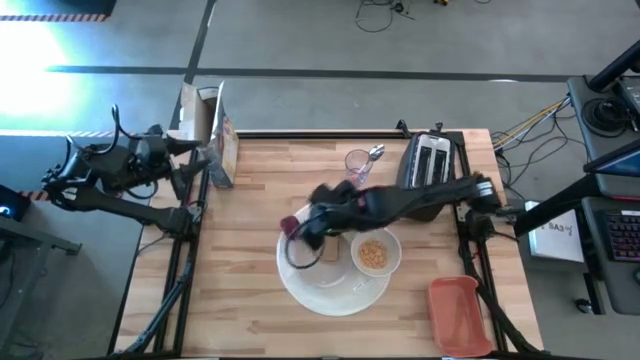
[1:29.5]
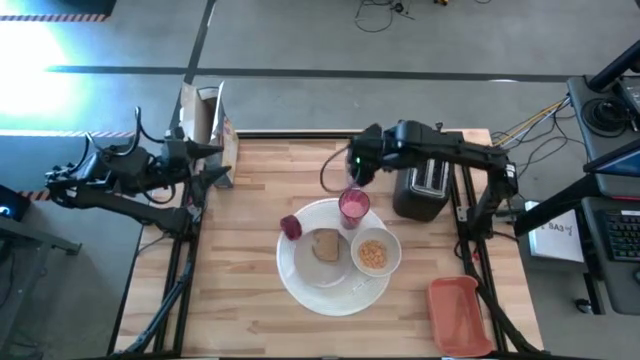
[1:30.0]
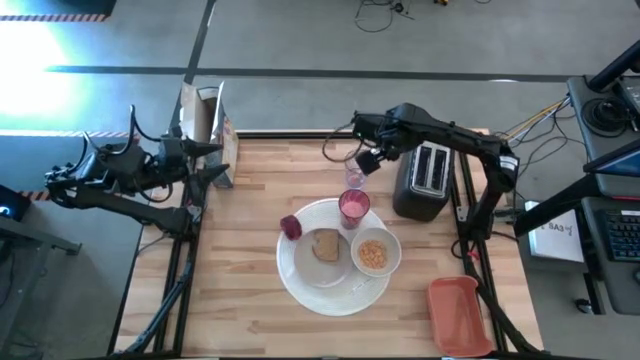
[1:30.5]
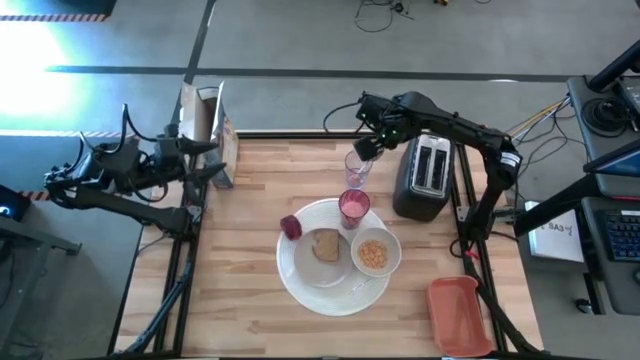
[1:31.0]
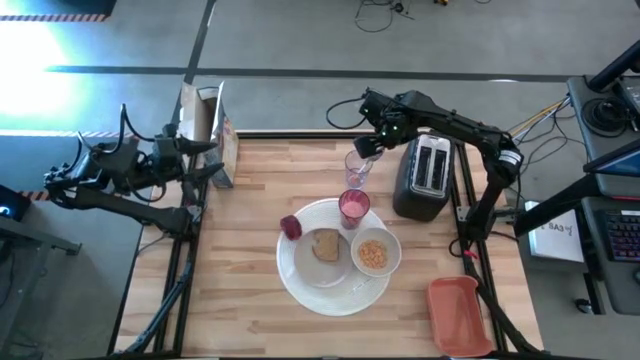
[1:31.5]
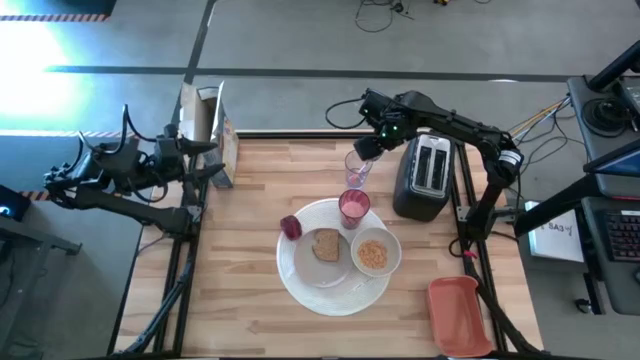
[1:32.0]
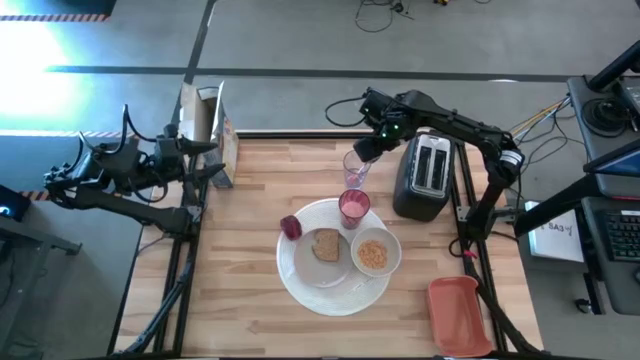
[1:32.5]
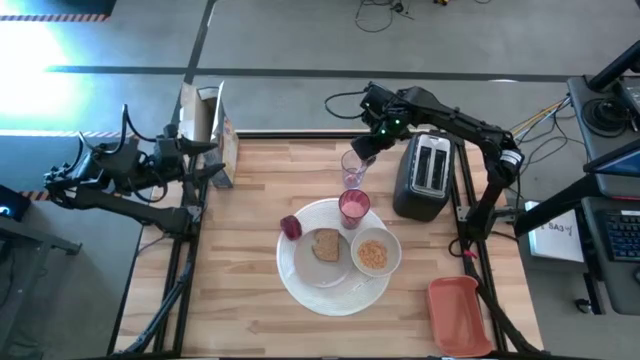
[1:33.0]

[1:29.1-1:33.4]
Task: Arrange a breakfast setting
Put the orange spoon from the transparent cup to the right of the white bowl

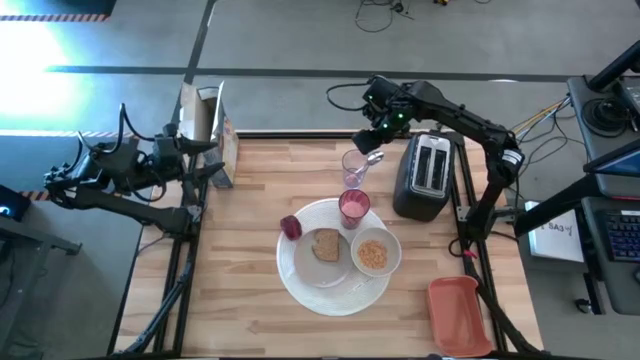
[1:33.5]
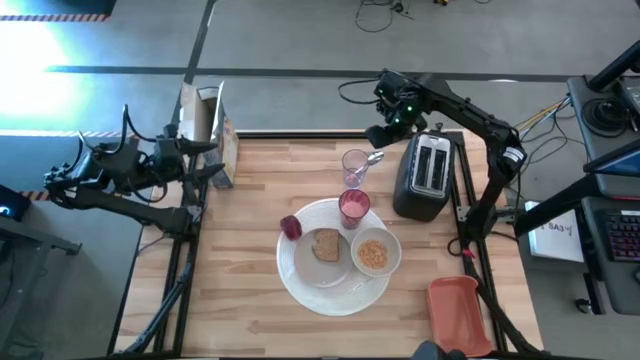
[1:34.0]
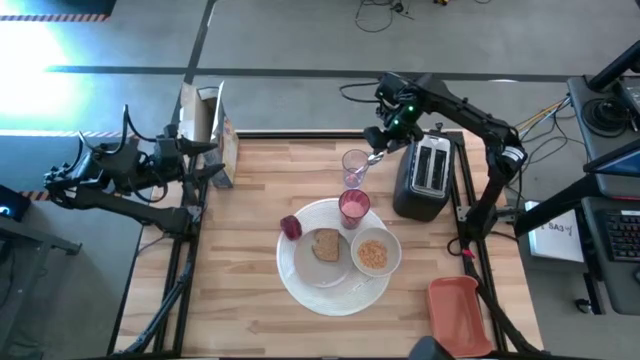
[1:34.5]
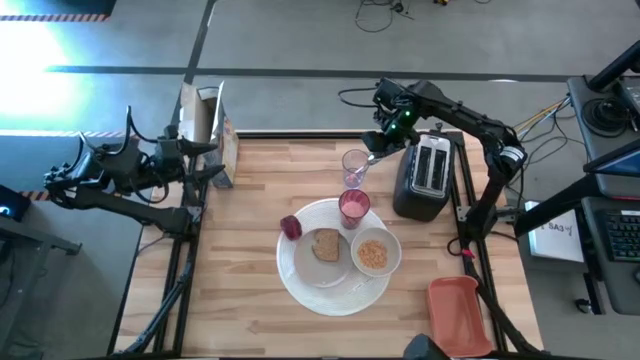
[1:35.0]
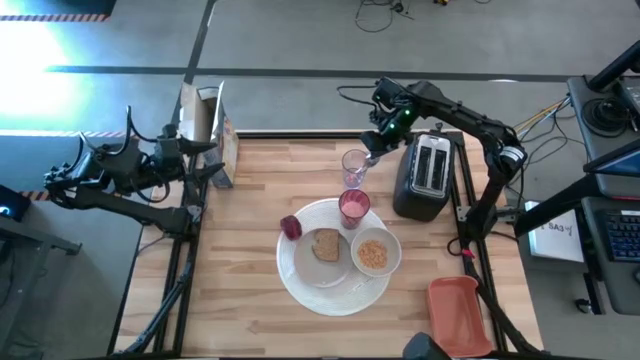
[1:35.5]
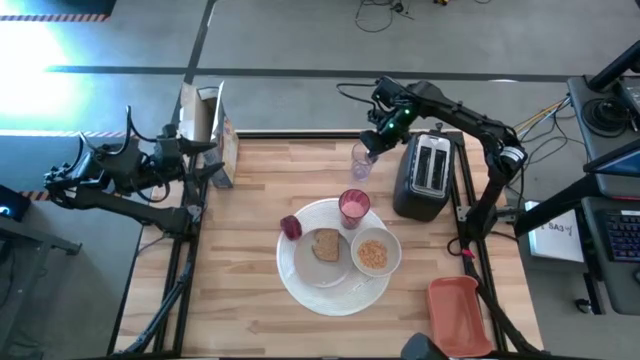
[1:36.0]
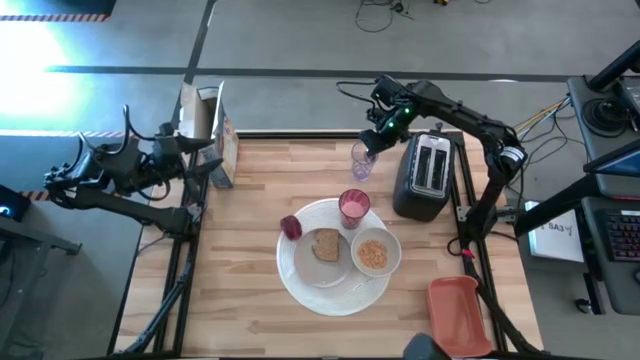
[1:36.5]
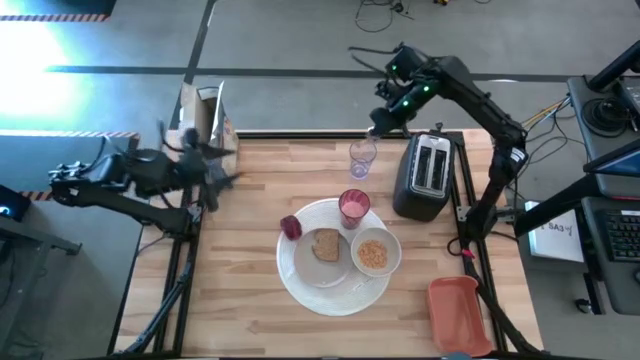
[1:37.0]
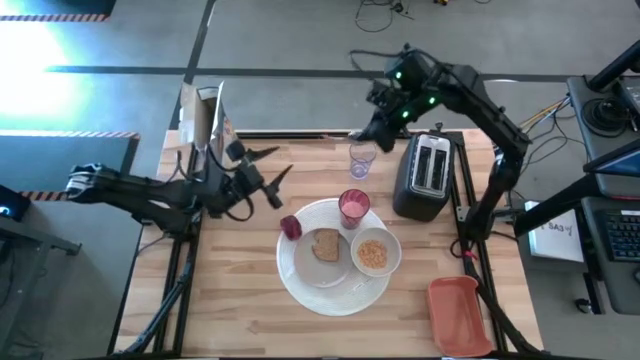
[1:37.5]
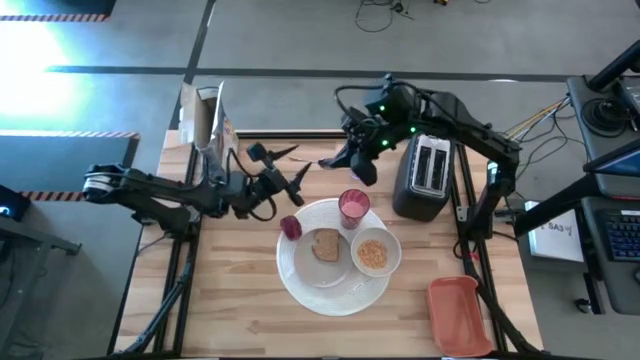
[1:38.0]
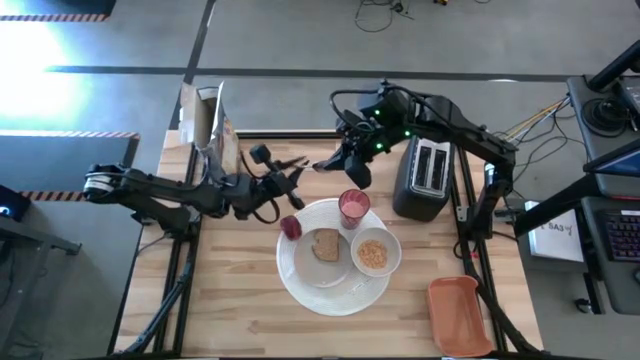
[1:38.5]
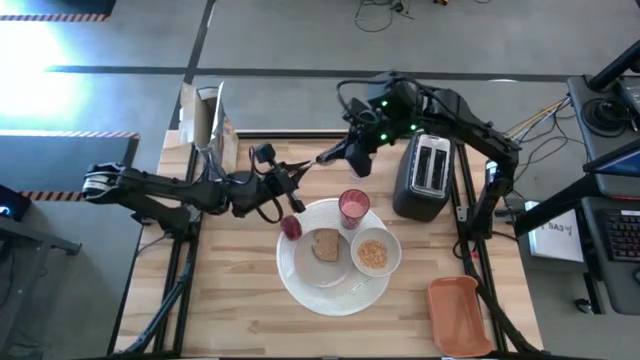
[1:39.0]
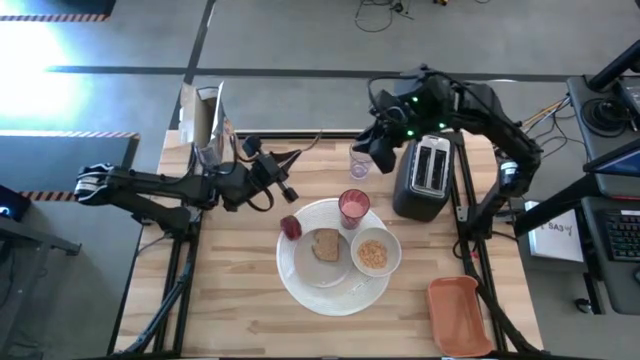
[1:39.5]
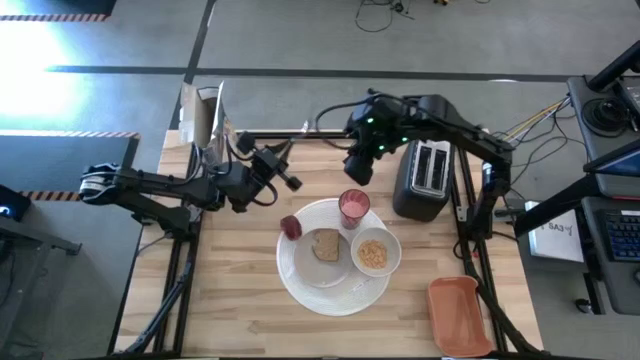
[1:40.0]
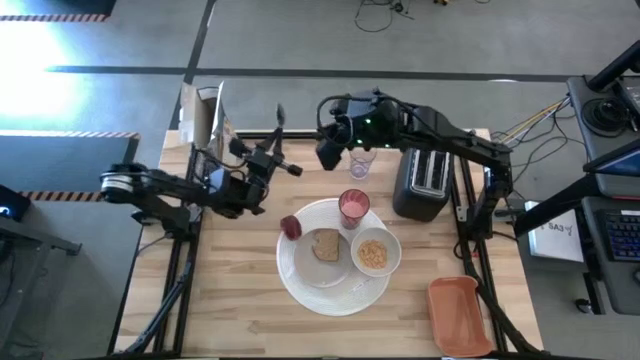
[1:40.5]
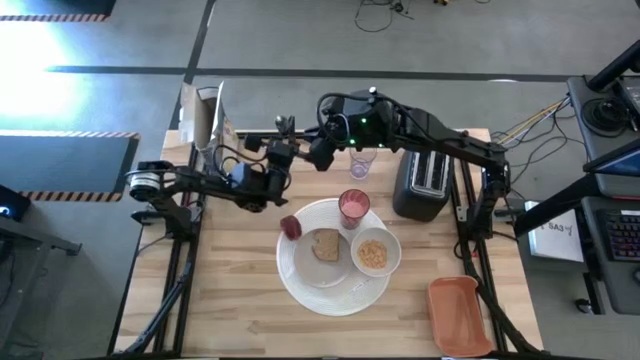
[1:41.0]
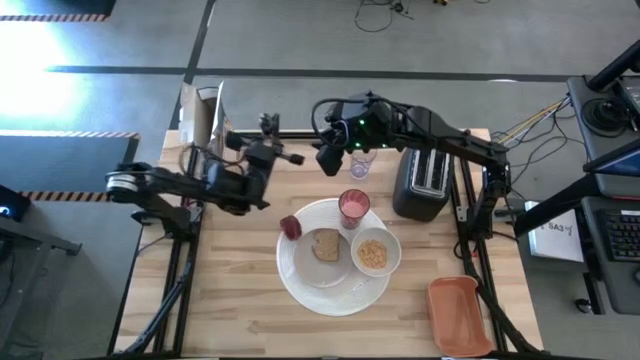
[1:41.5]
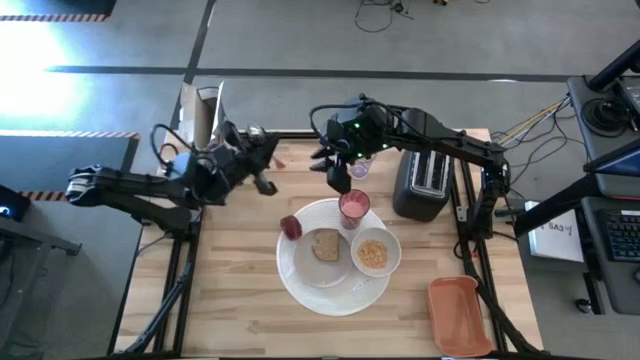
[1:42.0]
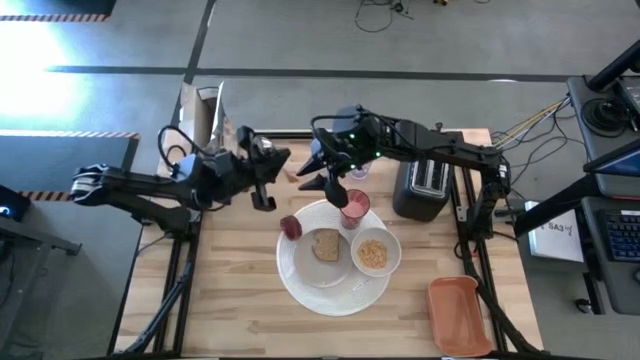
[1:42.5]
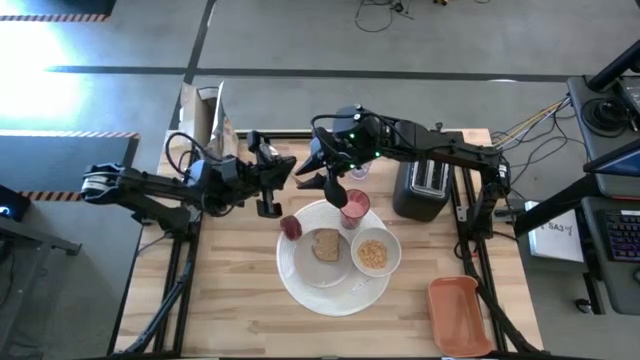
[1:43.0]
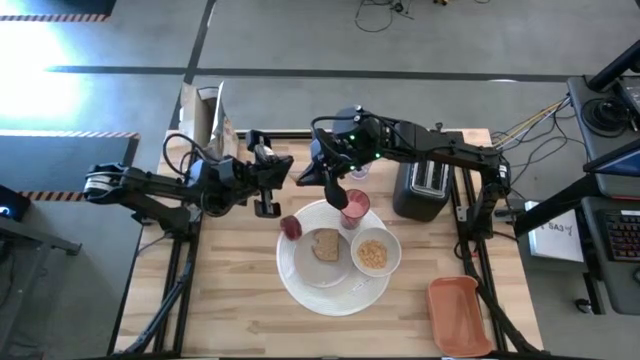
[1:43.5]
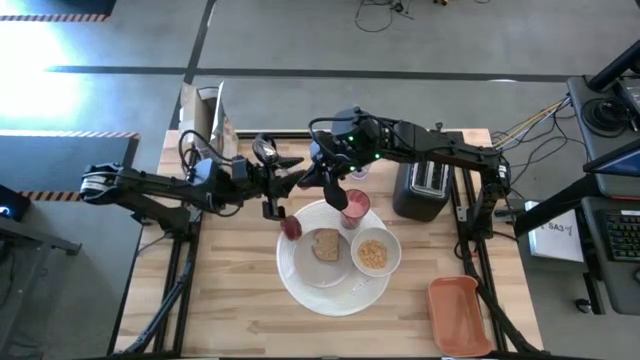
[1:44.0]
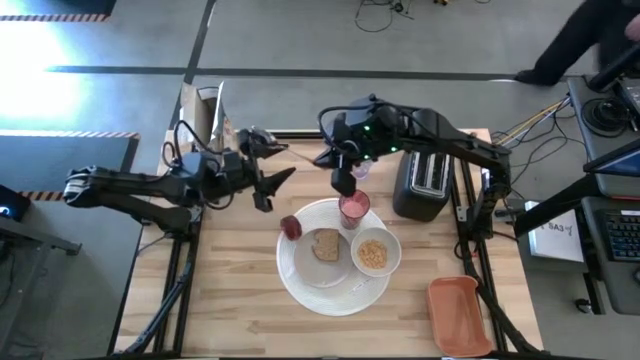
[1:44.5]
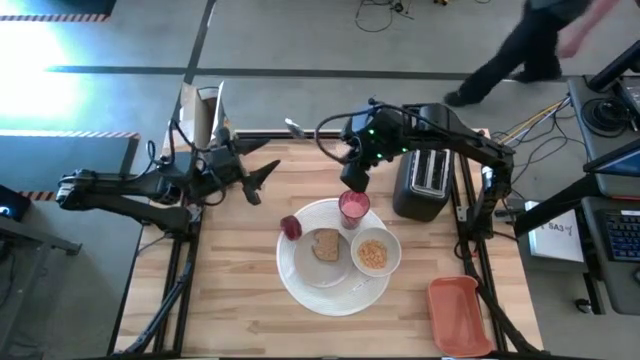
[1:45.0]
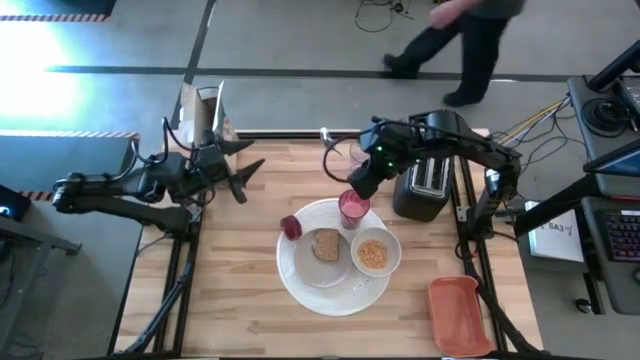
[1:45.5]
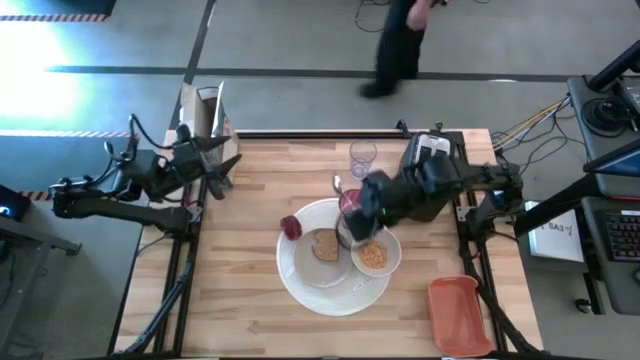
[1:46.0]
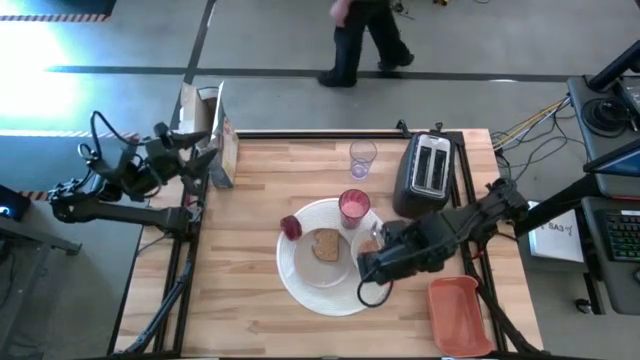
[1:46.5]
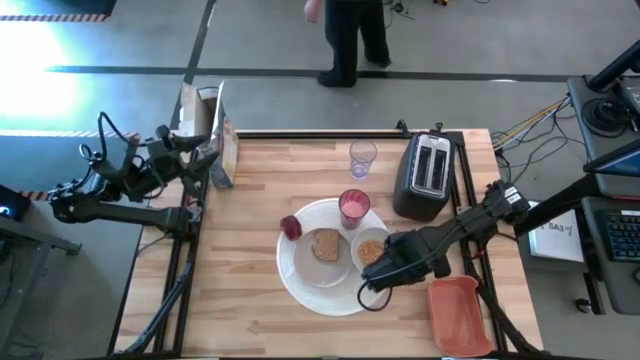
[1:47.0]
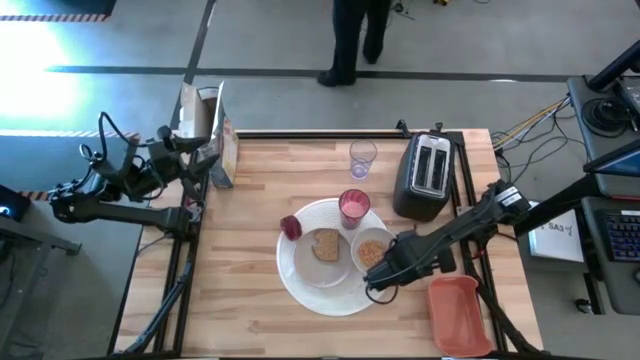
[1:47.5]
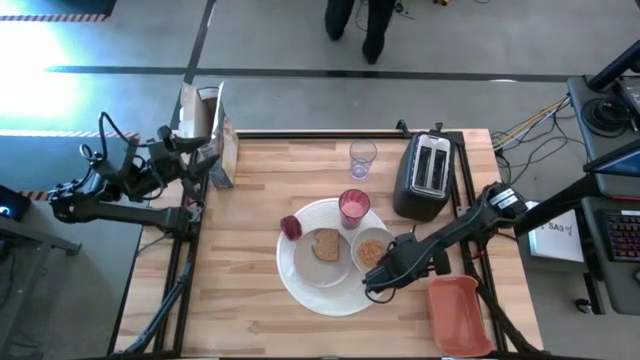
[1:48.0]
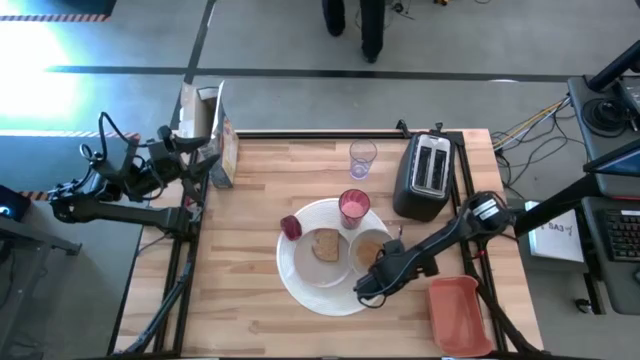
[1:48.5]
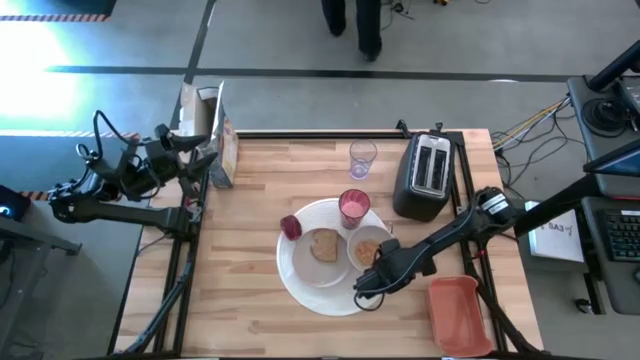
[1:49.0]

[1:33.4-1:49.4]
Put the orange spoon from the transparent cup to the right of the white bowl

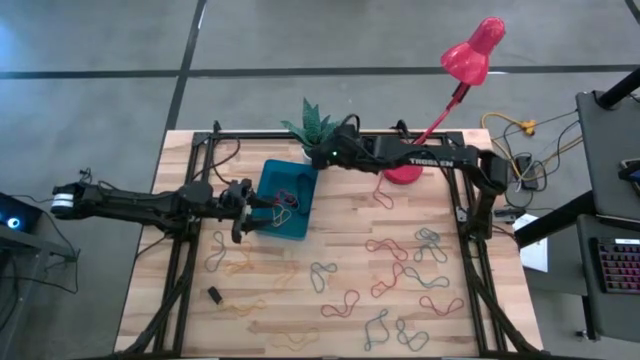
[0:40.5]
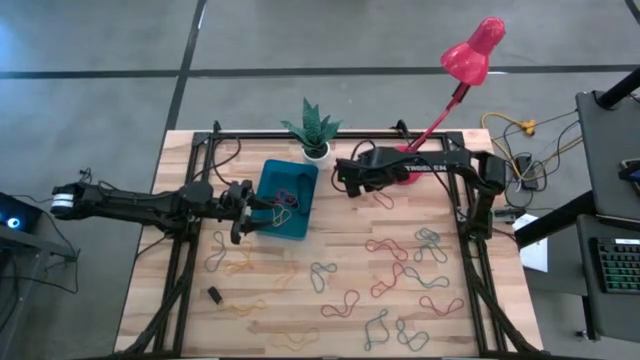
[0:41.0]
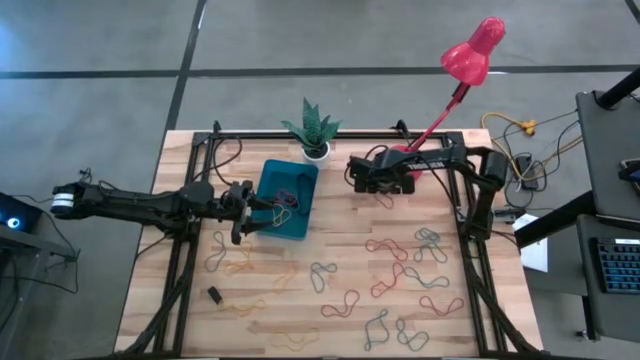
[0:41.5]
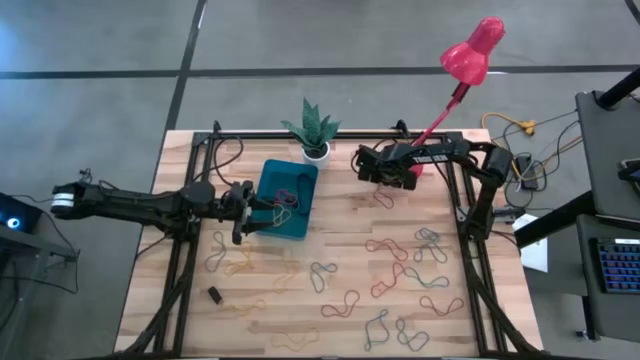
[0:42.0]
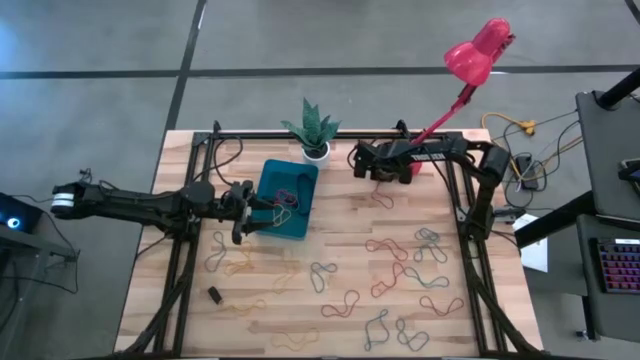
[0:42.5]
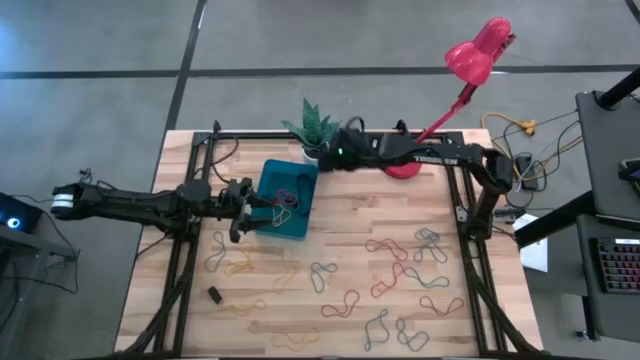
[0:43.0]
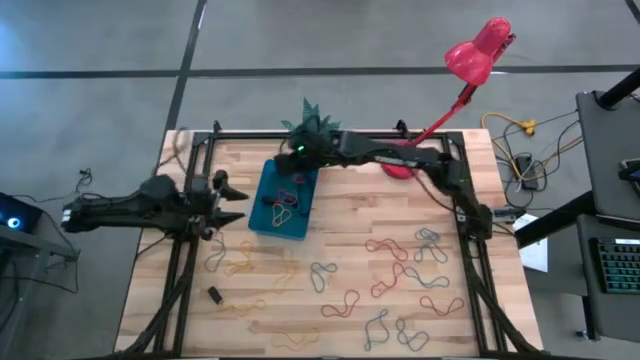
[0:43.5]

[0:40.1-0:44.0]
Task: Pick and place rubber bands into bin
Put the orange rubber band into the blue bin
